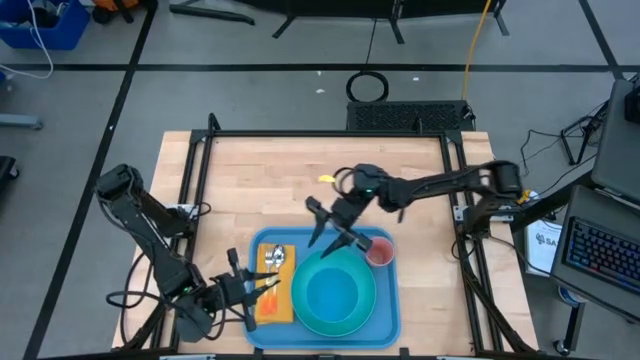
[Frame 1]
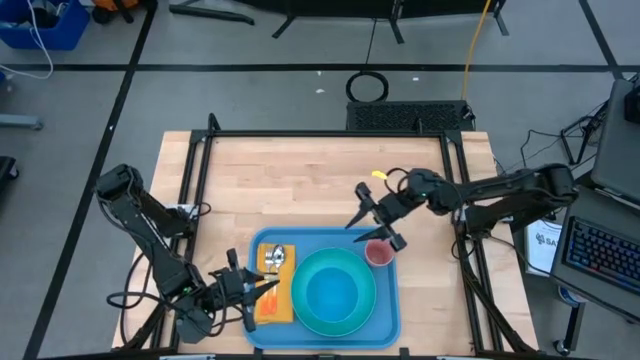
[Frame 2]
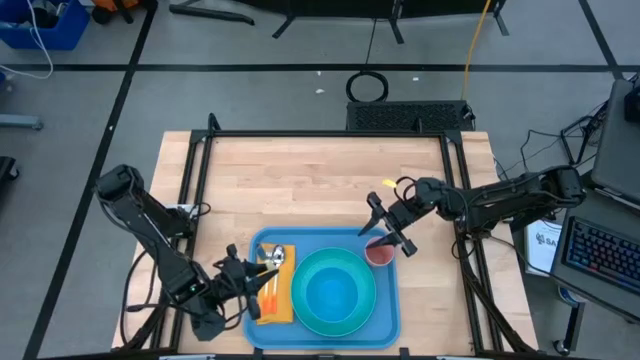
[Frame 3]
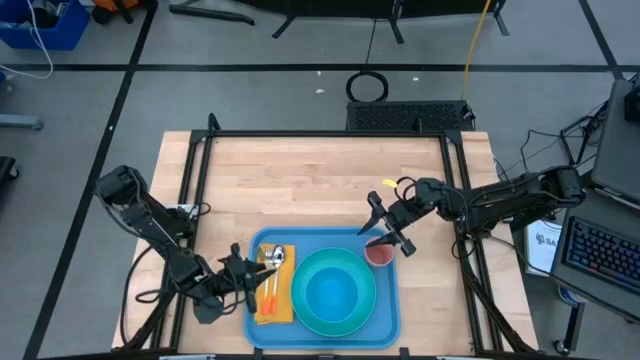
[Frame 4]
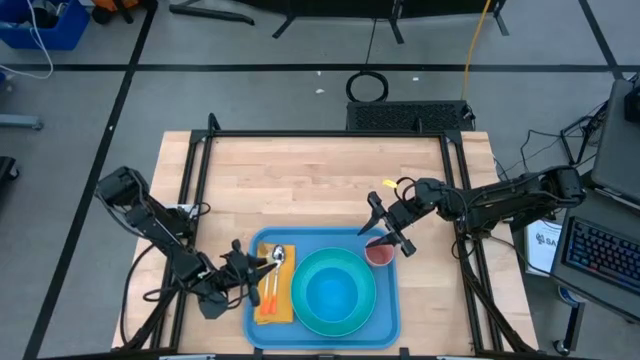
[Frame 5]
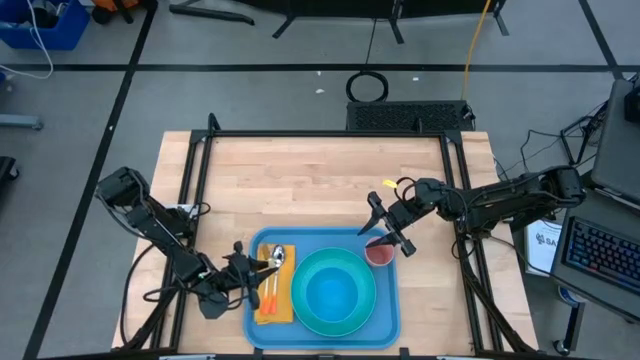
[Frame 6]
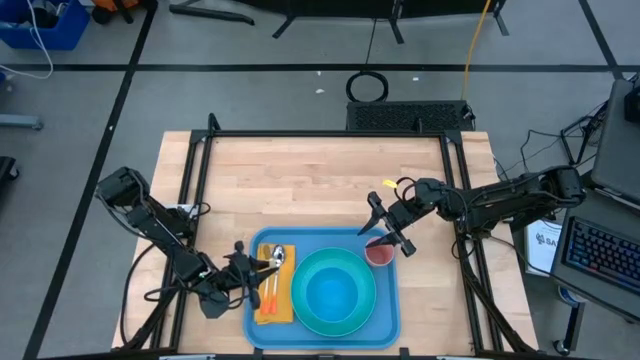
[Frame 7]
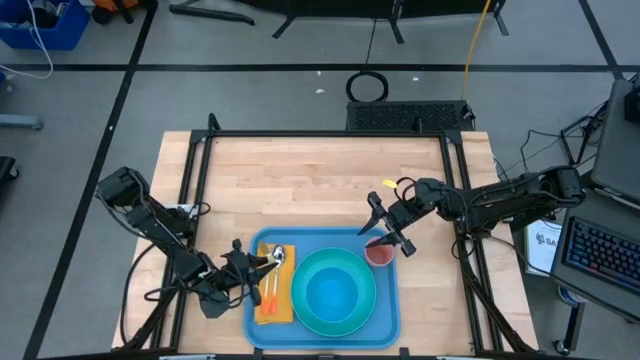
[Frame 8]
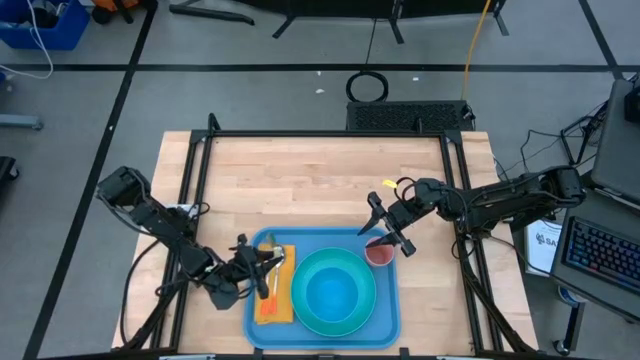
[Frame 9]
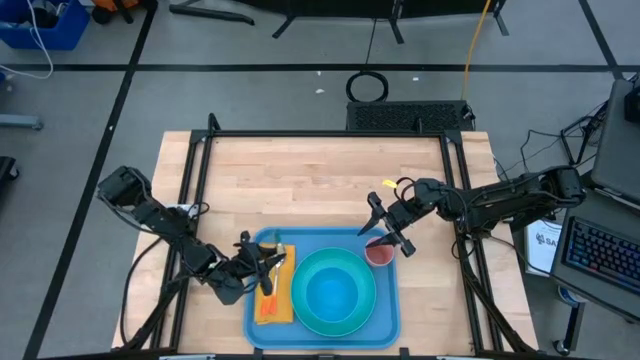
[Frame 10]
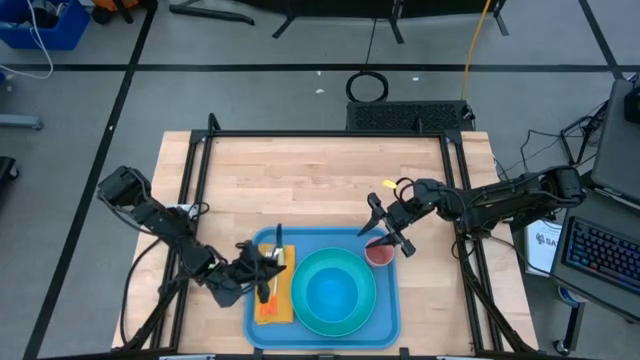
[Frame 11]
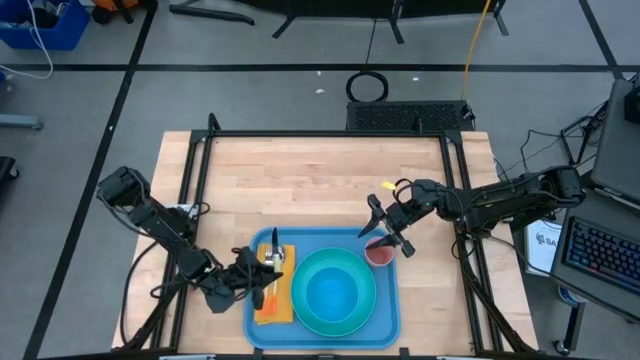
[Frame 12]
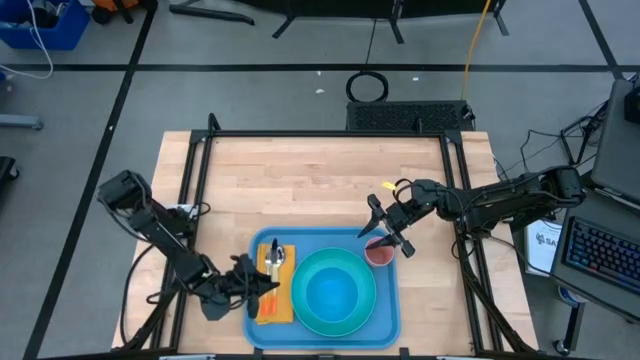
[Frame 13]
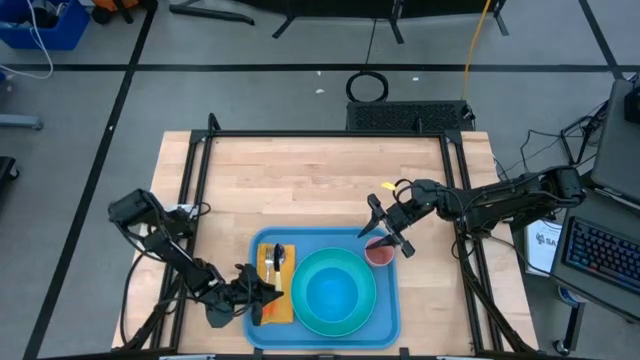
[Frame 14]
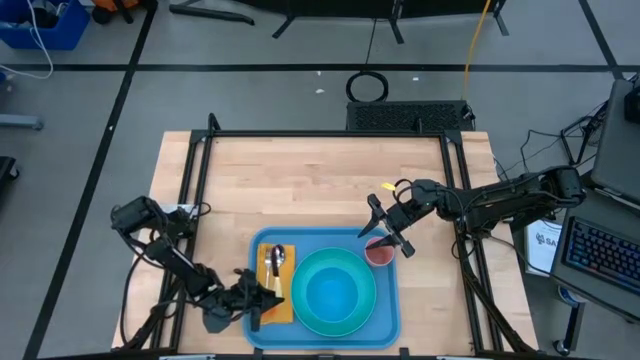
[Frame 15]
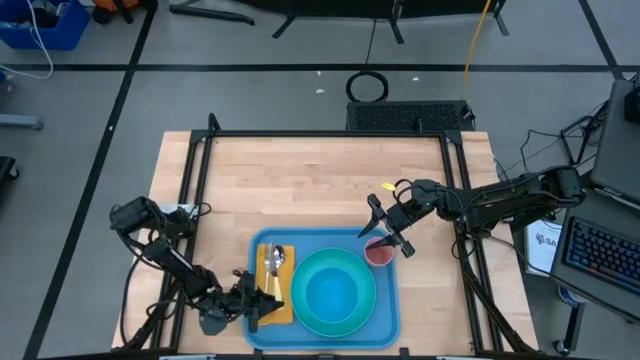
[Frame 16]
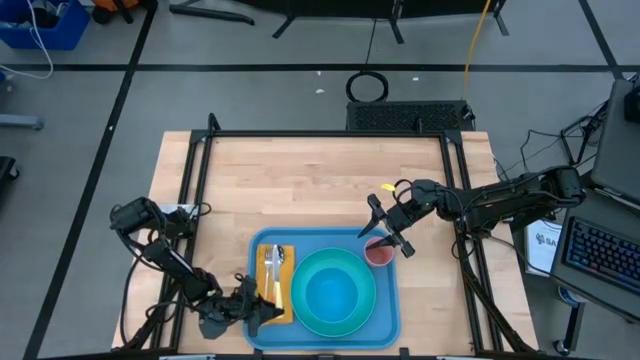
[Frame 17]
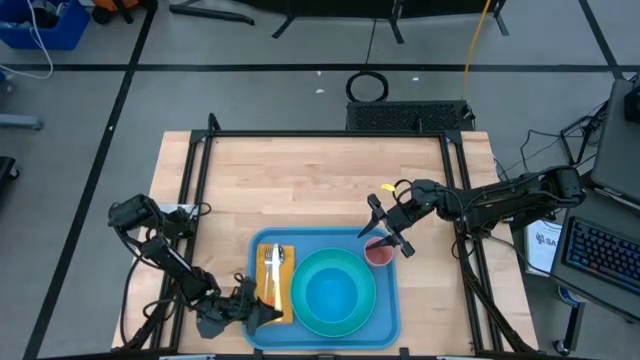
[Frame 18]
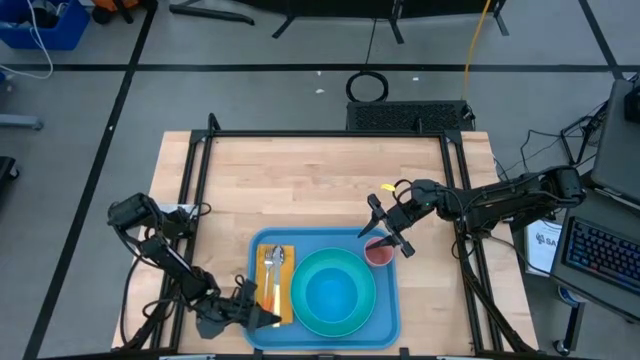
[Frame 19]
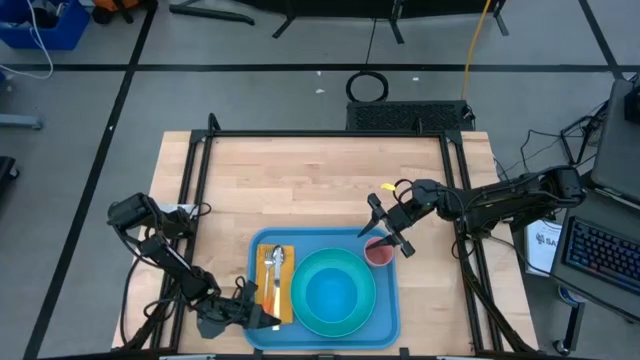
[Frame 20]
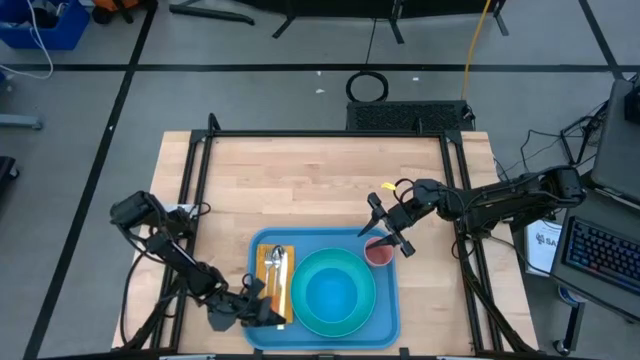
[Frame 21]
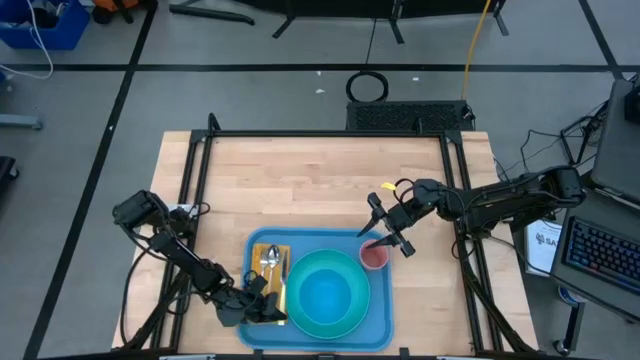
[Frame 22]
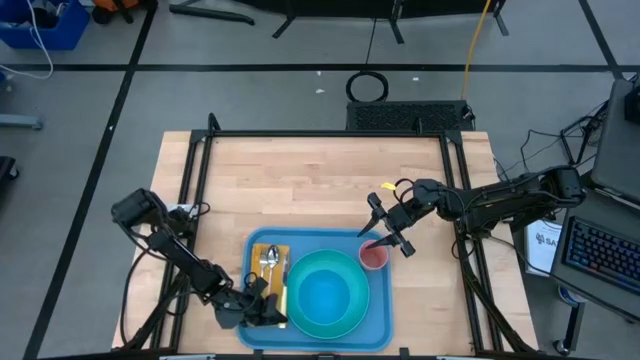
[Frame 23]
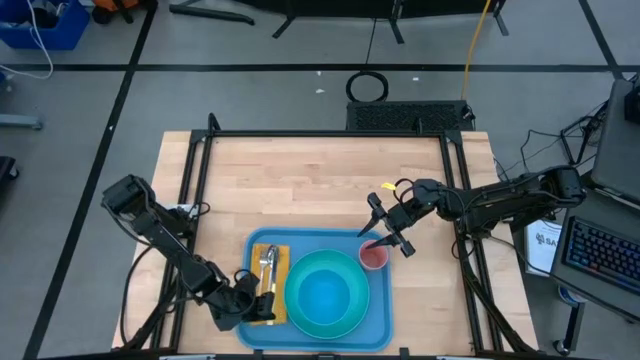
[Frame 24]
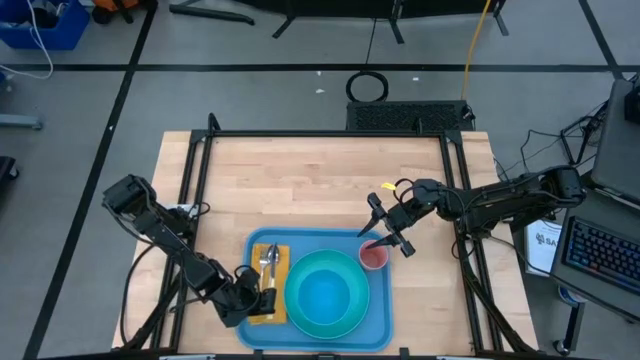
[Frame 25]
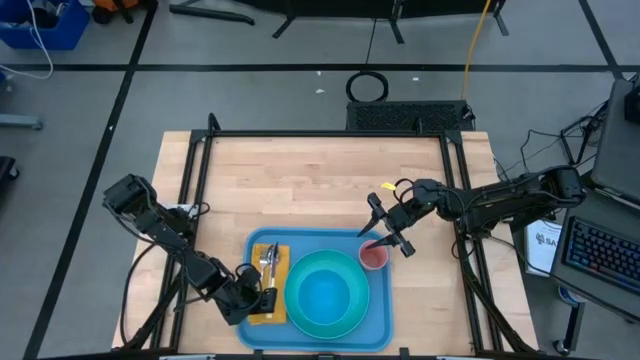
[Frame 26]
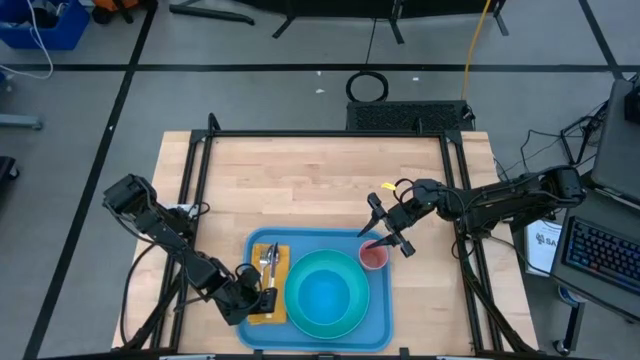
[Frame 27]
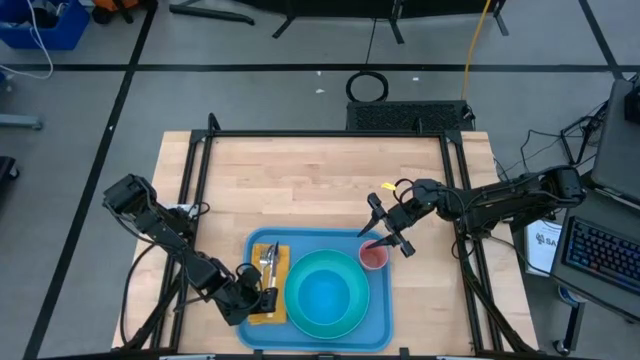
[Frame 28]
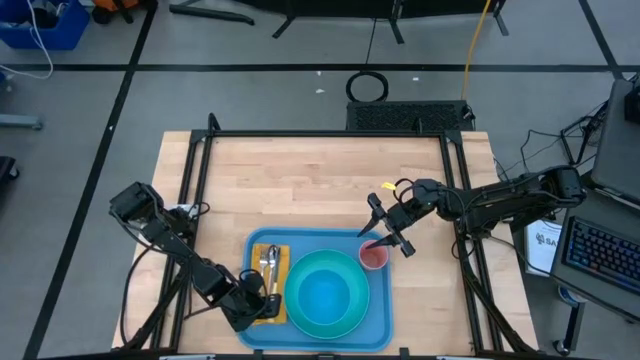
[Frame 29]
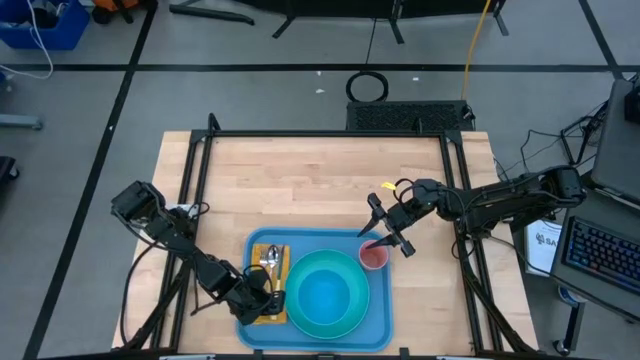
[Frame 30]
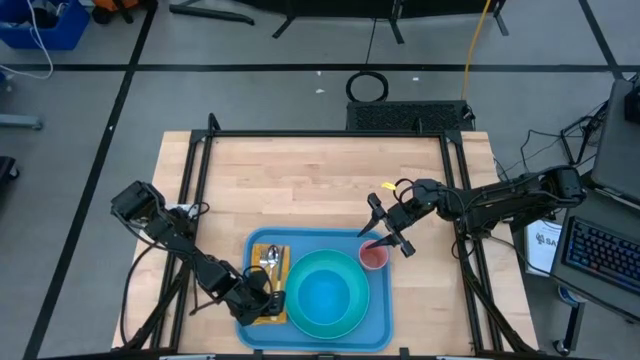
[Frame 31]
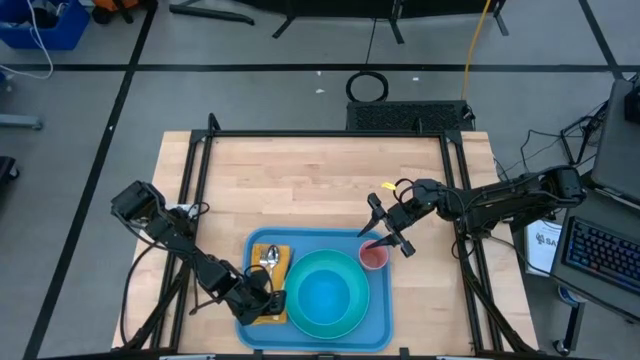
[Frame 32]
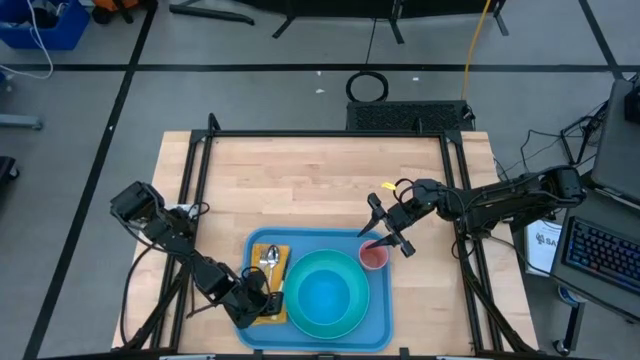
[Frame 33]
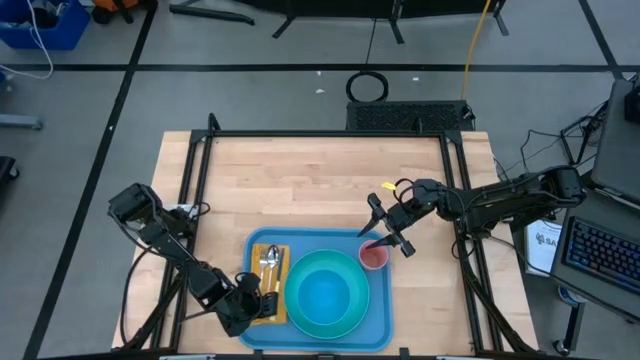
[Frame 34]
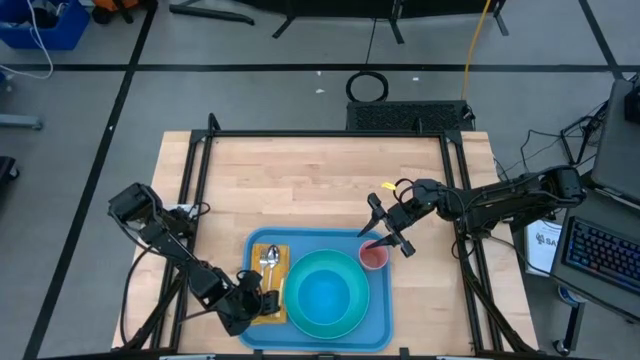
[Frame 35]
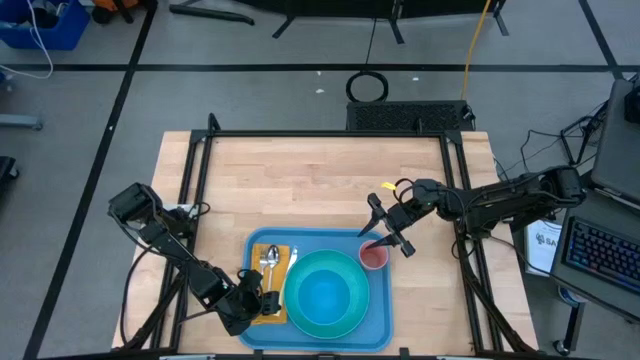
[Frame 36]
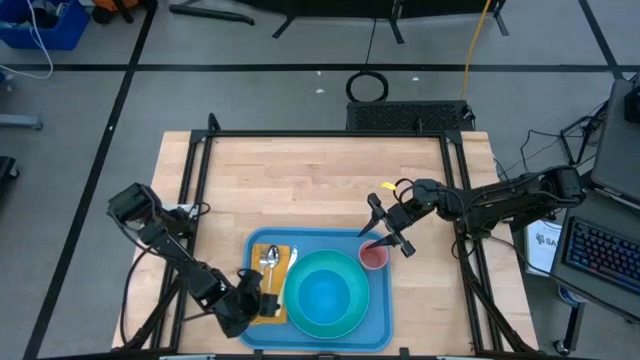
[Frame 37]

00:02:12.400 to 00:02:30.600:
Task: Set up tray
Put the yellow knife on the yellow napkin to the right of the orange spoon

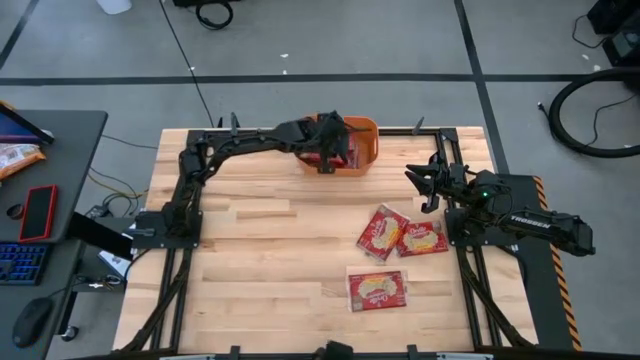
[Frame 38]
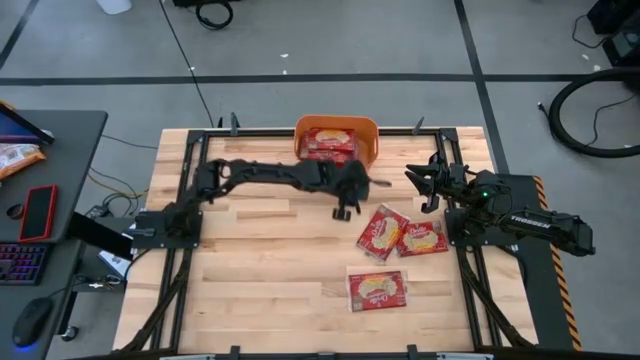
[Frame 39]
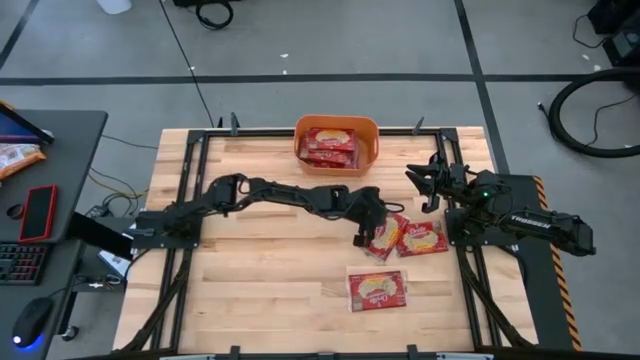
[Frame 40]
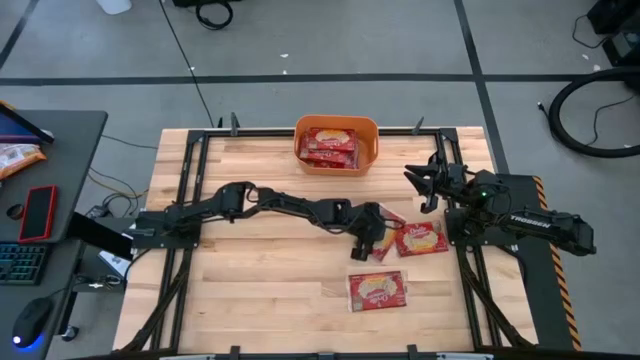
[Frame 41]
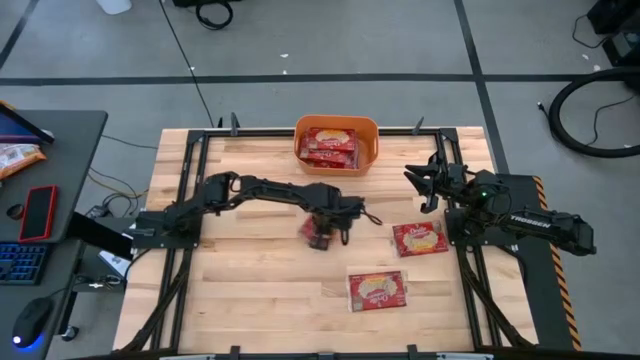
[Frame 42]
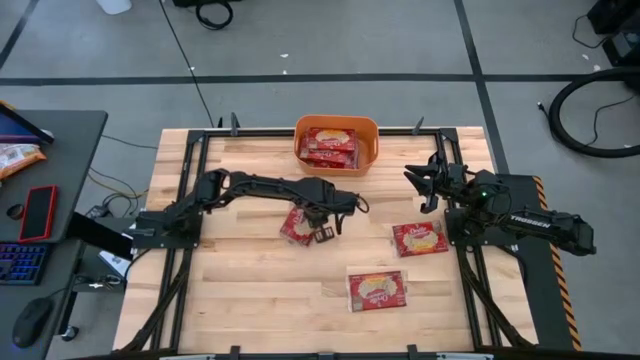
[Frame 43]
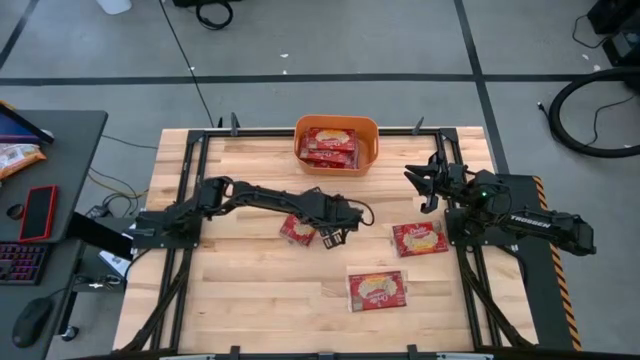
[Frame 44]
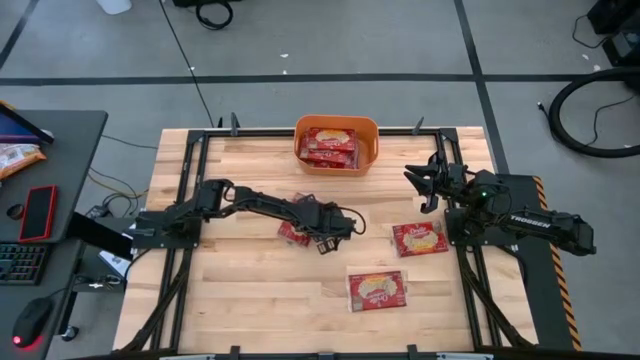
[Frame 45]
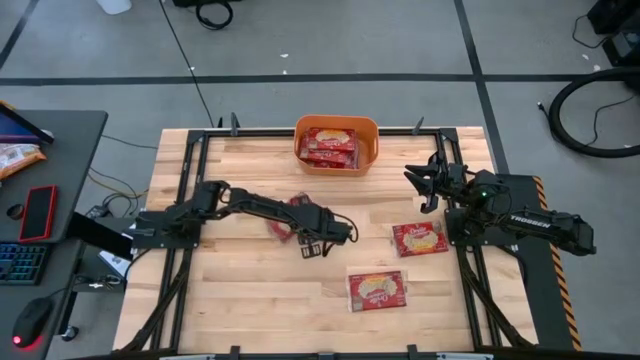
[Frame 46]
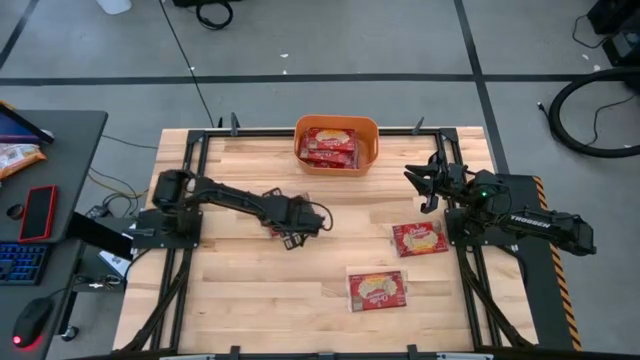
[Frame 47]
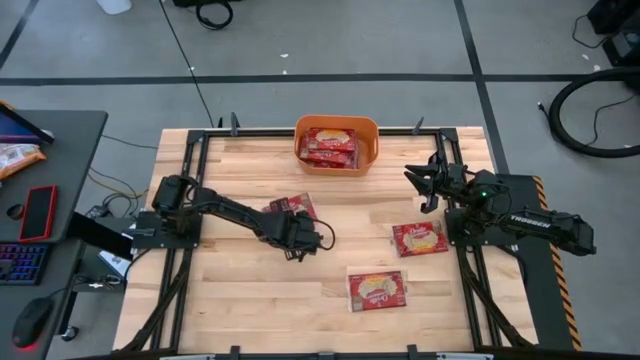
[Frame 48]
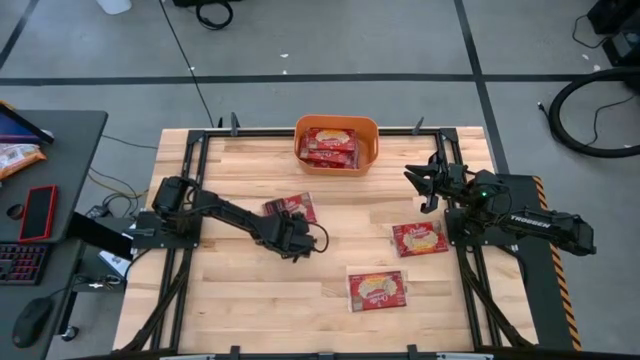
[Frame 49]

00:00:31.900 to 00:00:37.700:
Task: Sort popcorn bags into baskets
Put the red popcorn bag into the orange bin
